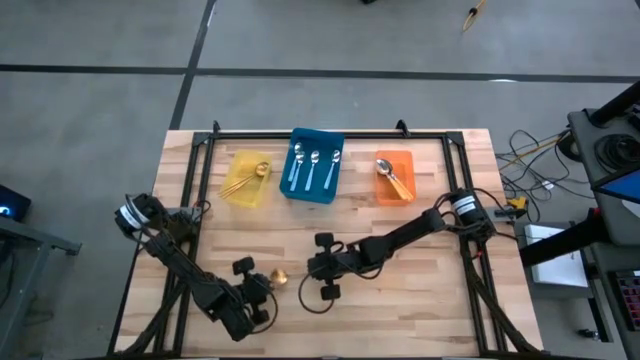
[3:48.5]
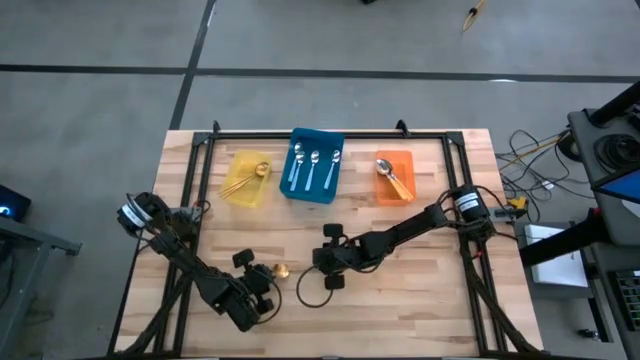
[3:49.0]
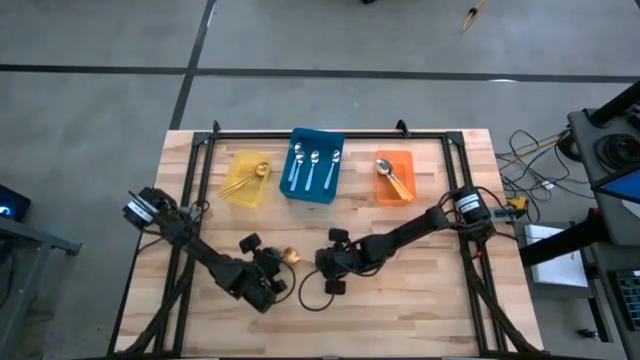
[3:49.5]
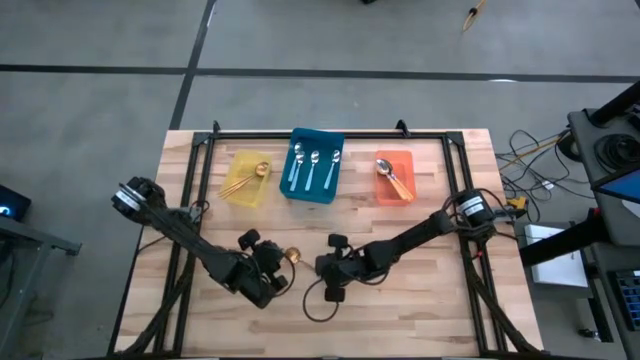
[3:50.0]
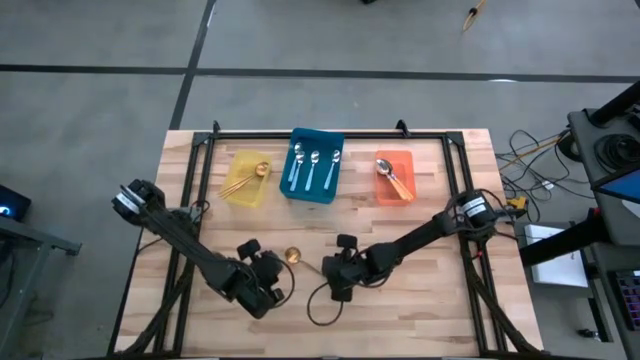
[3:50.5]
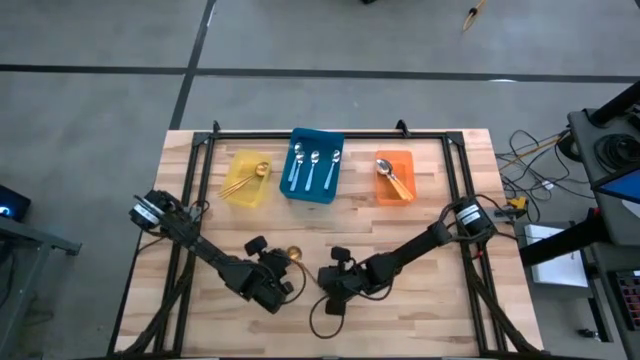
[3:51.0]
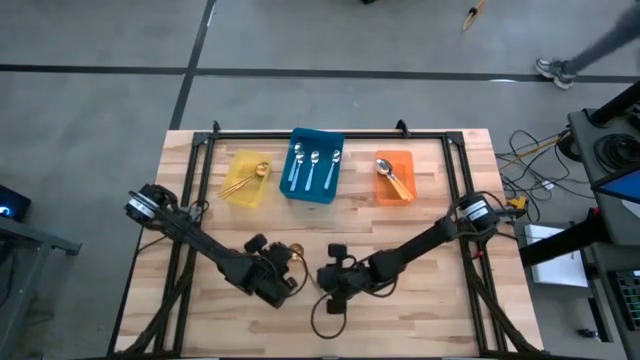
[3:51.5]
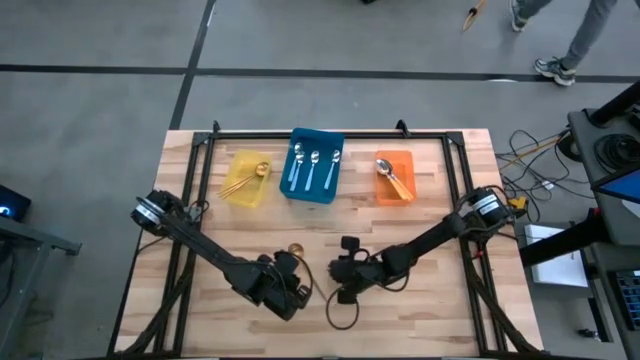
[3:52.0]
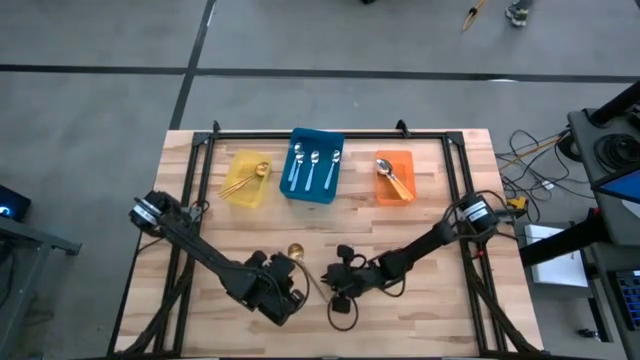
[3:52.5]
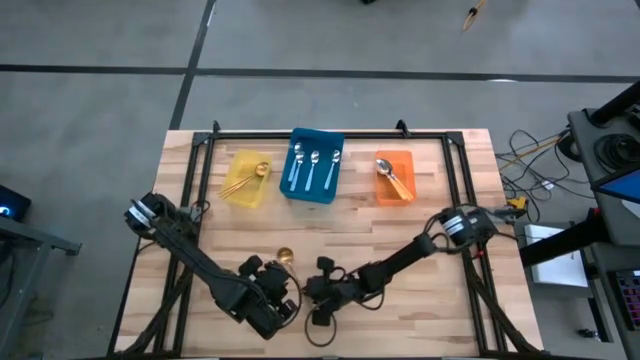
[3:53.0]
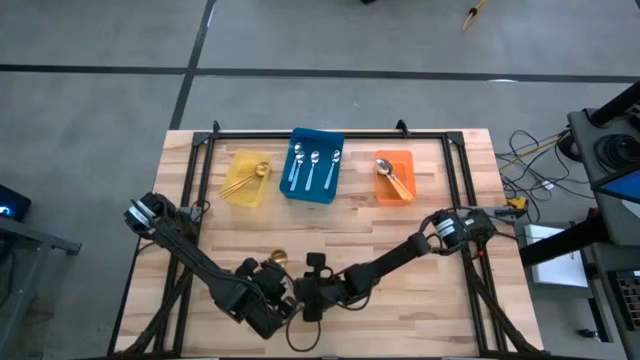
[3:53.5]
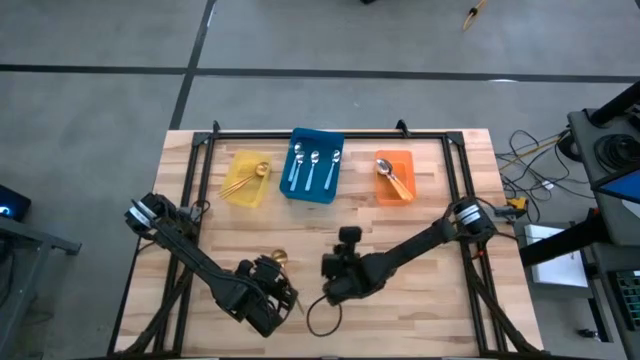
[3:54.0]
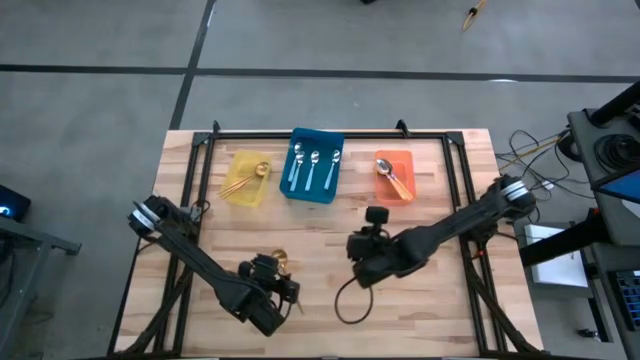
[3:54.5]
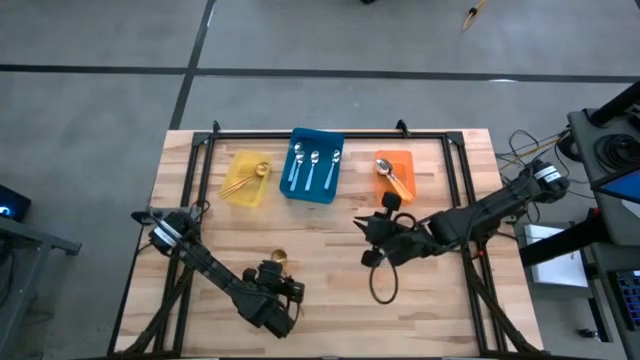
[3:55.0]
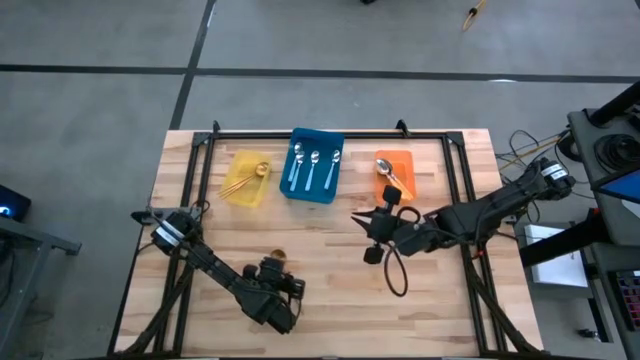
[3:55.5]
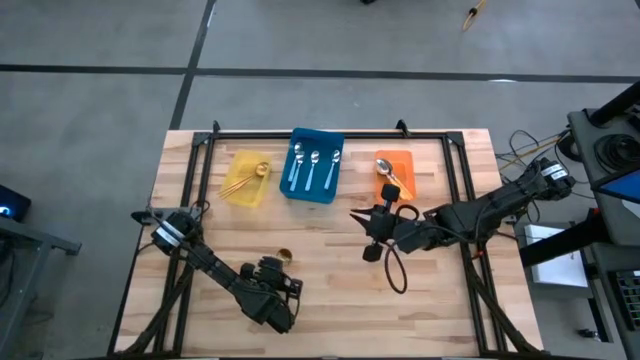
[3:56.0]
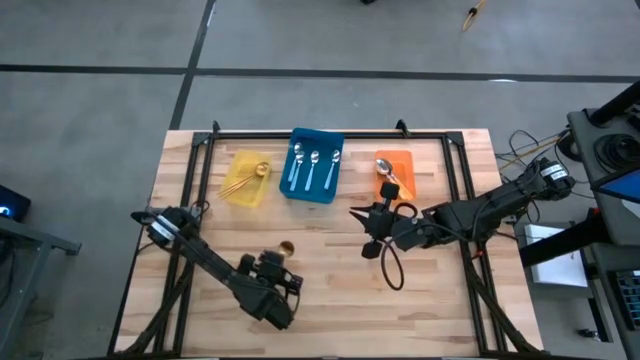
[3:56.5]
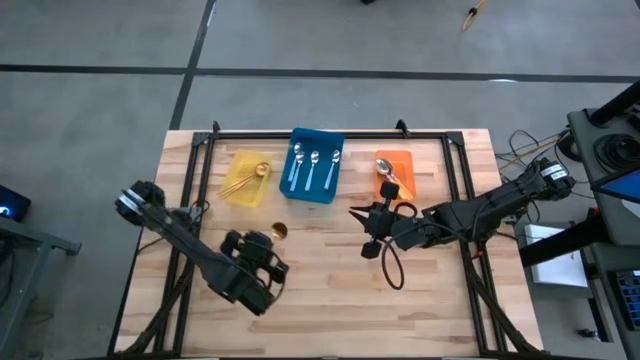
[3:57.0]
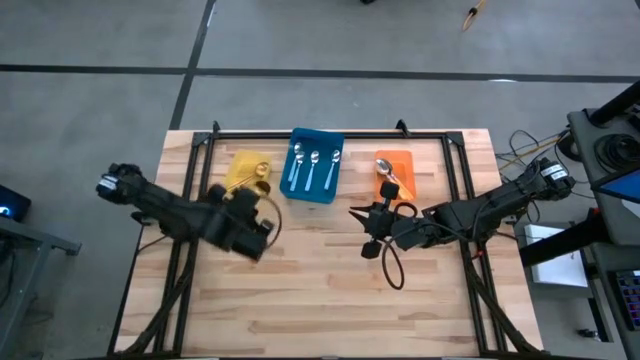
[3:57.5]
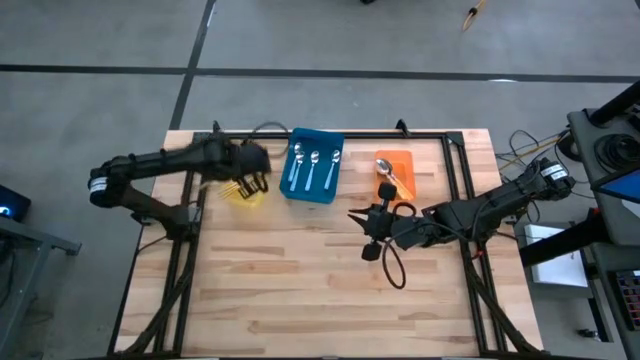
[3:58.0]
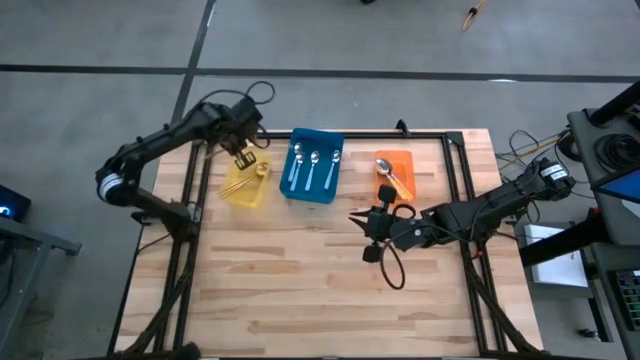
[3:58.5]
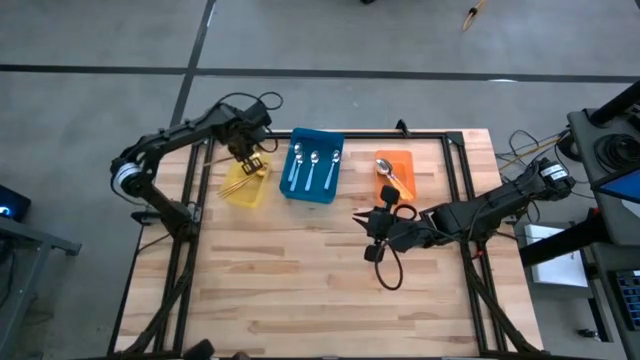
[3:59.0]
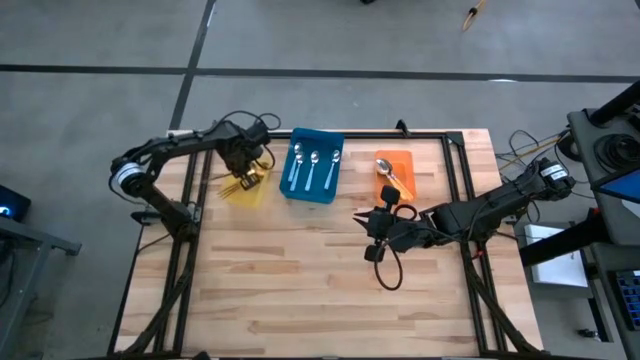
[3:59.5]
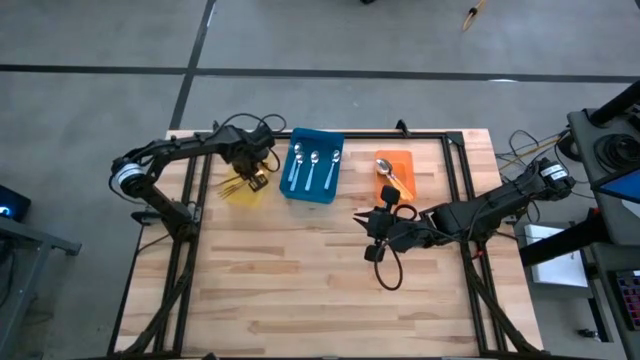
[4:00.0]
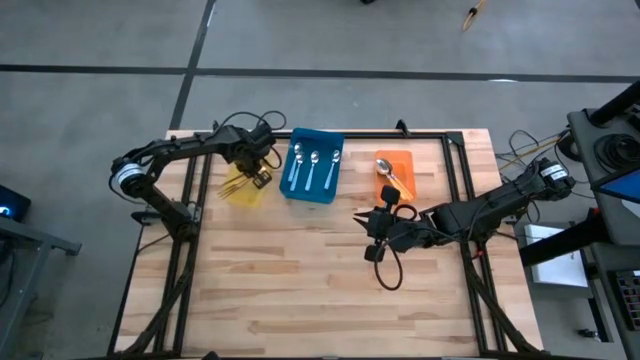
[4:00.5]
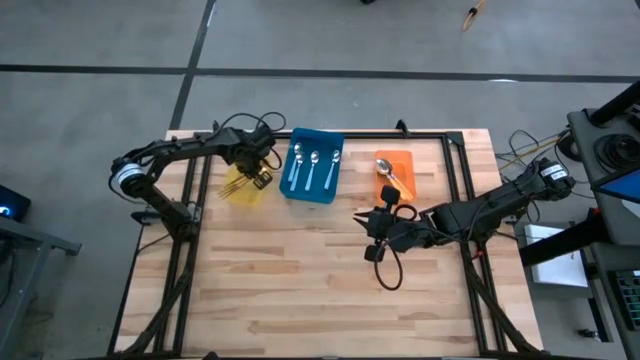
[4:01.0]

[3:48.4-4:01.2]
Task: Sort silverware by color (type)
Put the gold spoon into the yellow bin

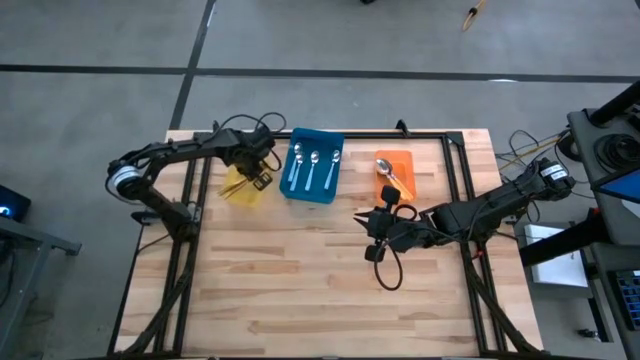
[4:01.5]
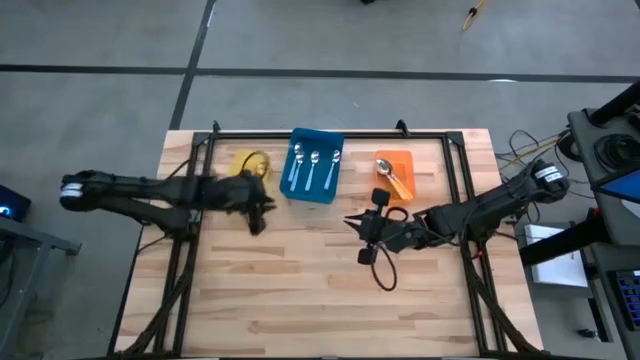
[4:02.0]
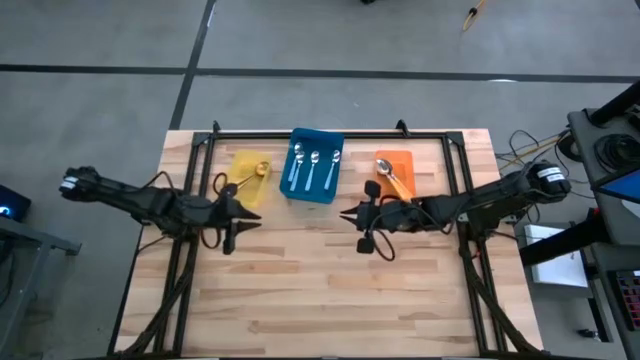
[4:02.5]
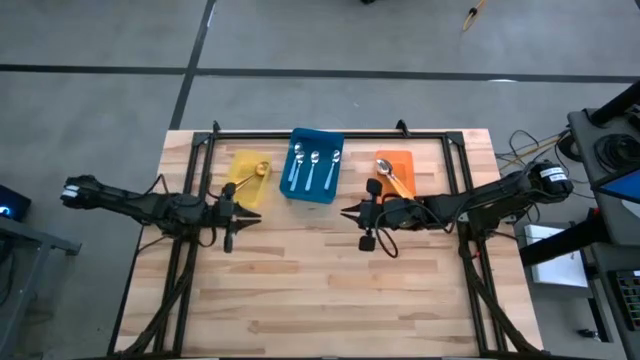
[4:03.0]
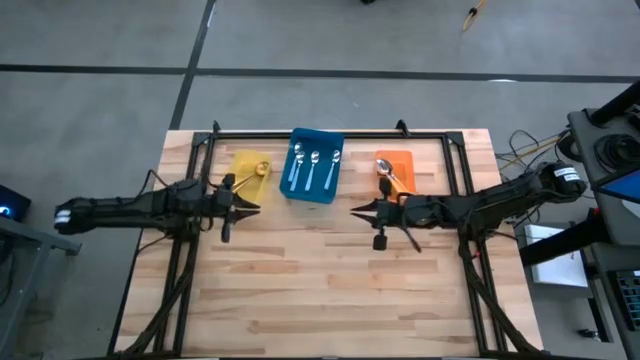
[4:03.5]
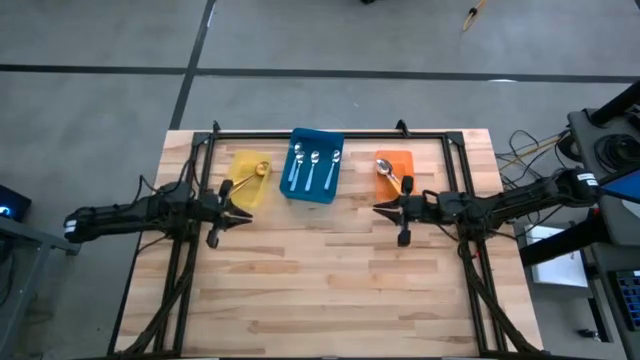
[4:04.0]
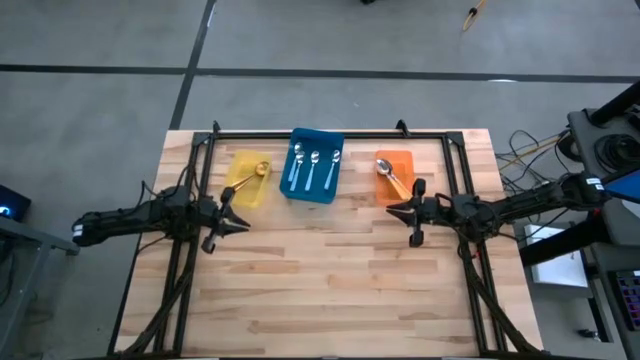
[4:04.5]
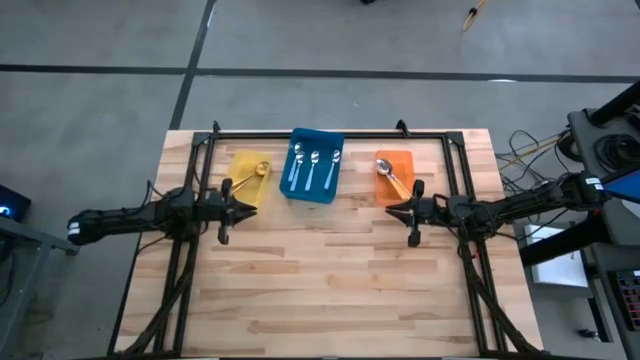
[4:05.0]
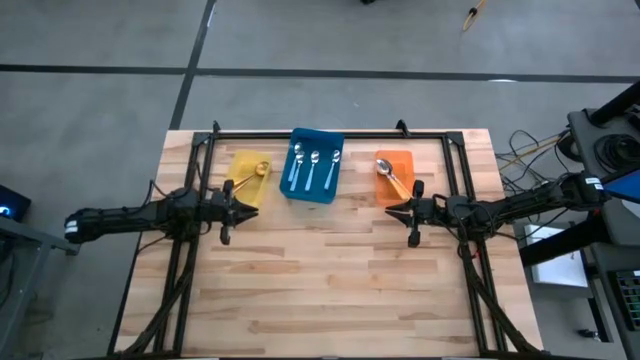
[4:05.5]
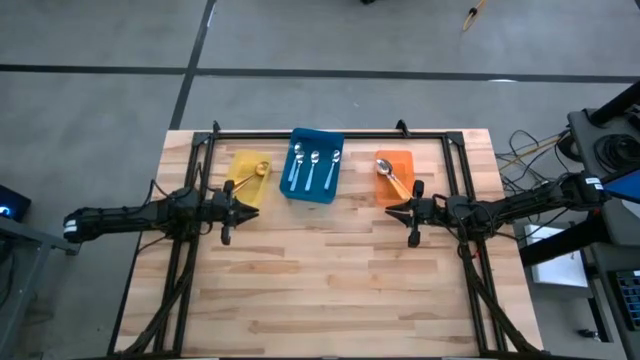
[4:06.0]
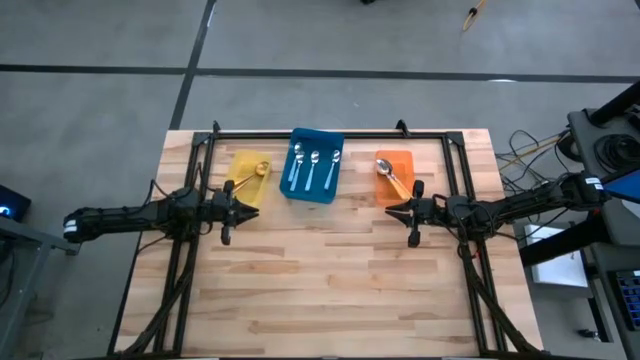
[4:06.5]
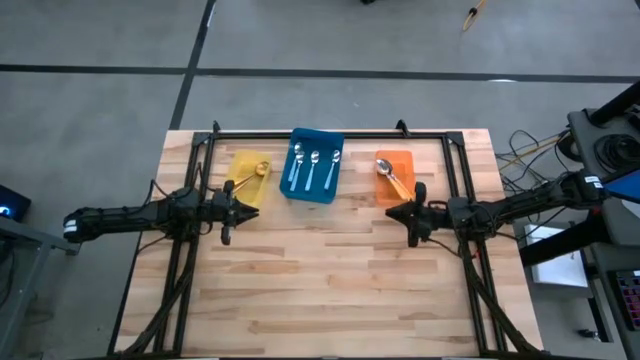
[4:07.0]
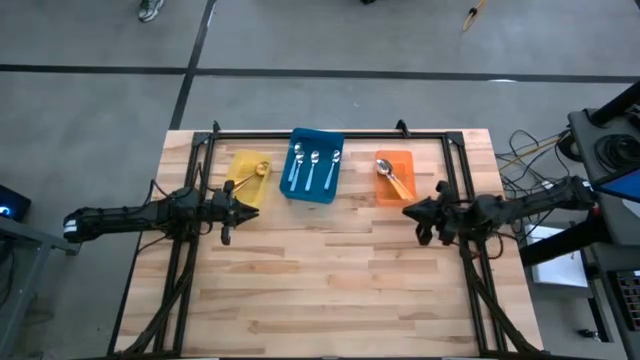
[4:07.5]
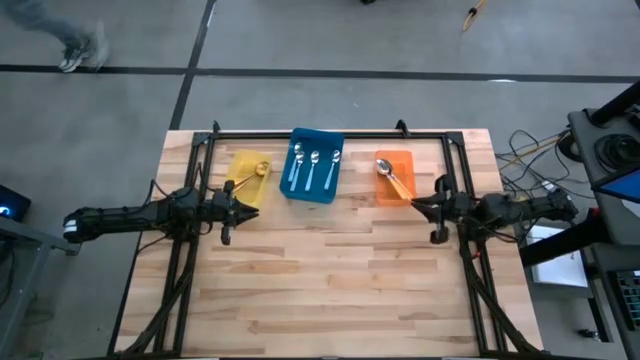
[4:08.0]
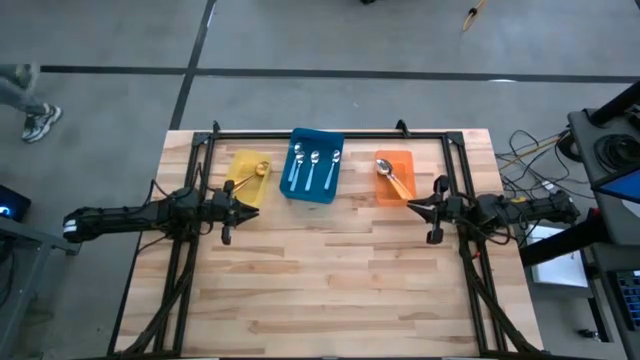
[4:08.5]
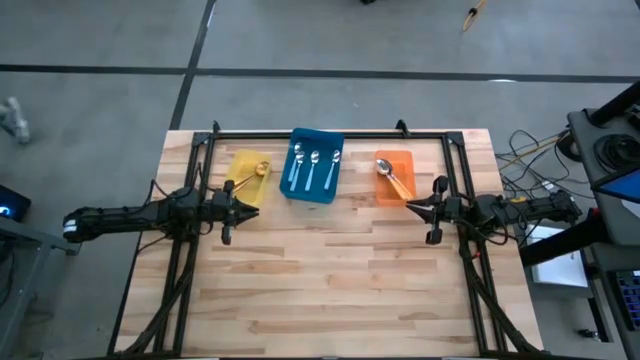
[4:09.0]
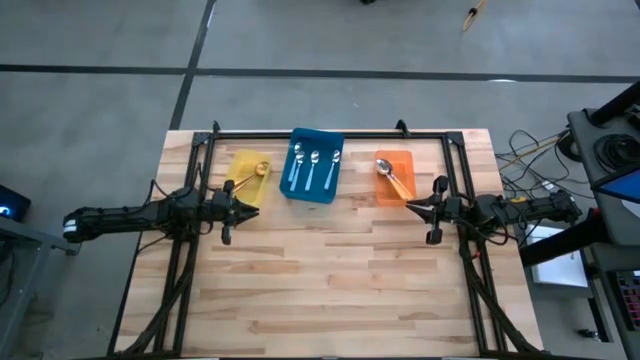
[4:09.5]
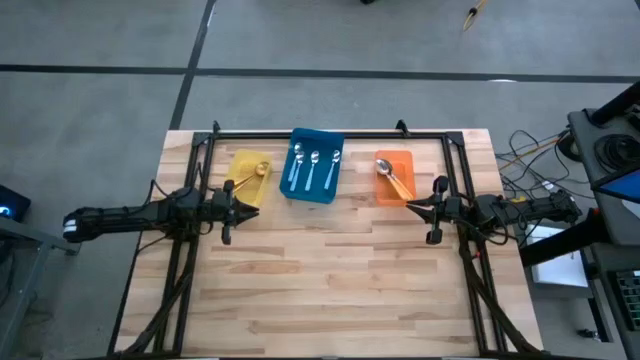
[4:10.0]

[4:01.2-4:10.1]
Return to Home Position
